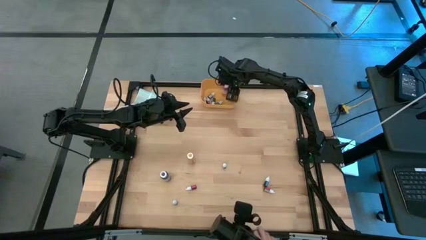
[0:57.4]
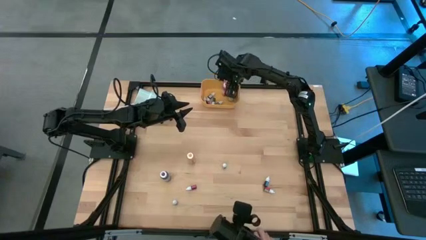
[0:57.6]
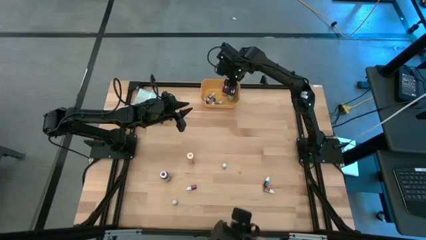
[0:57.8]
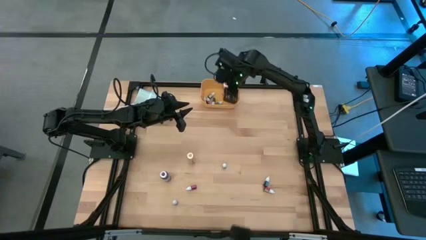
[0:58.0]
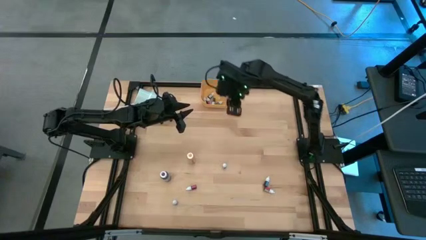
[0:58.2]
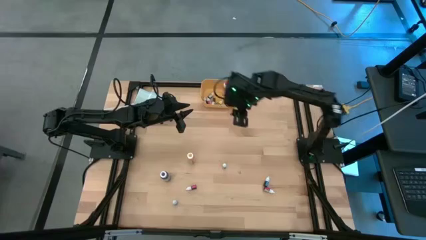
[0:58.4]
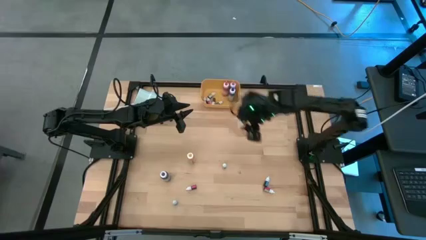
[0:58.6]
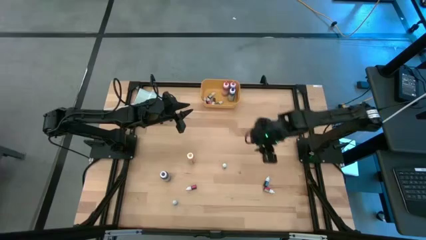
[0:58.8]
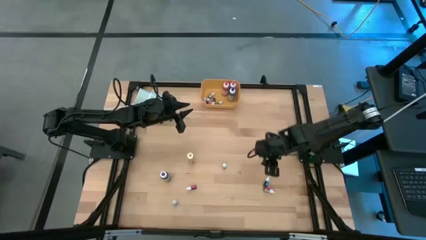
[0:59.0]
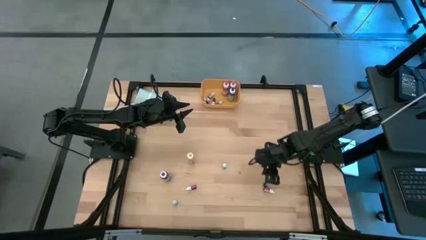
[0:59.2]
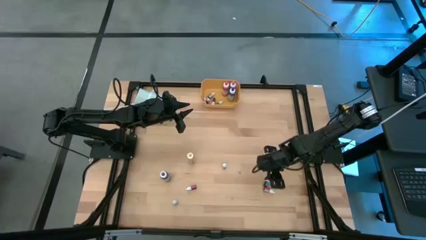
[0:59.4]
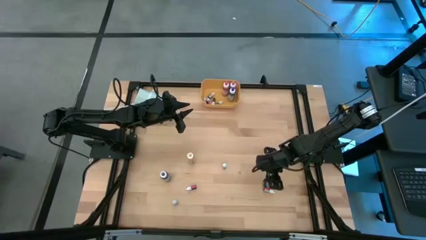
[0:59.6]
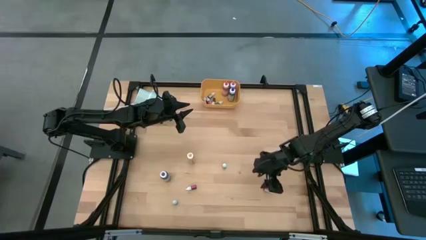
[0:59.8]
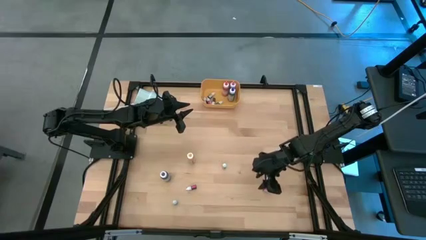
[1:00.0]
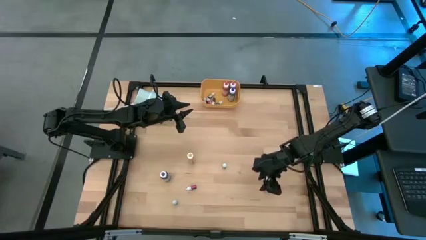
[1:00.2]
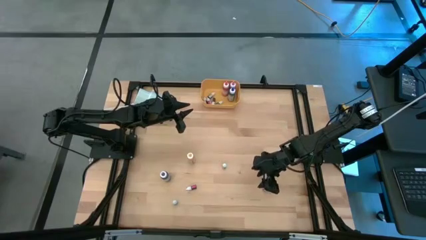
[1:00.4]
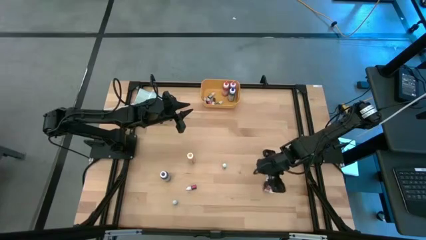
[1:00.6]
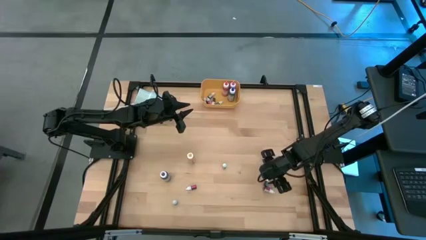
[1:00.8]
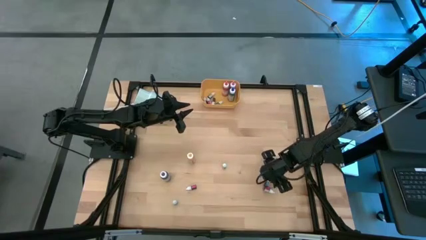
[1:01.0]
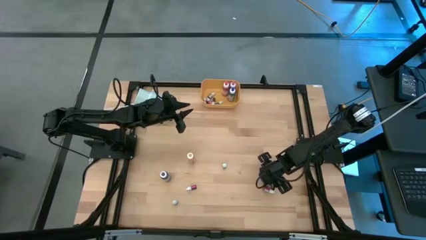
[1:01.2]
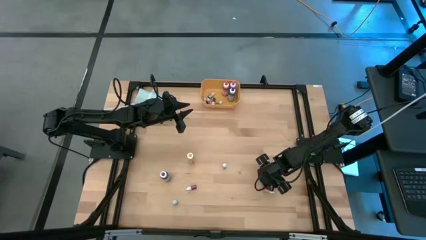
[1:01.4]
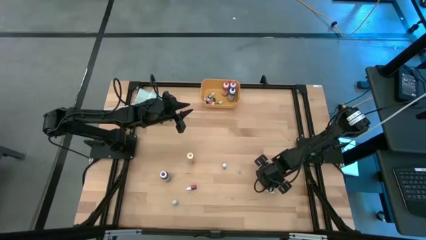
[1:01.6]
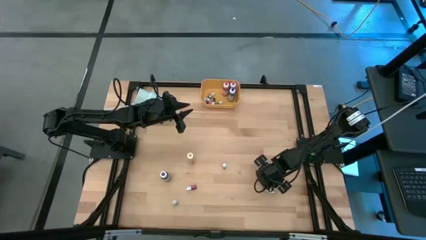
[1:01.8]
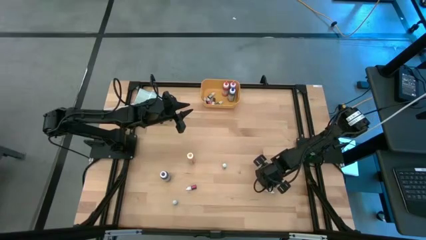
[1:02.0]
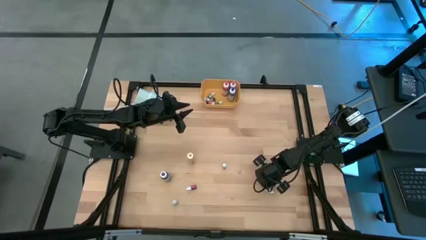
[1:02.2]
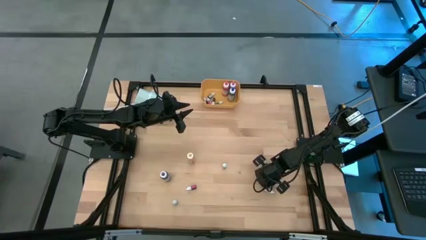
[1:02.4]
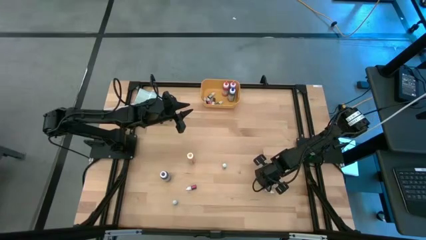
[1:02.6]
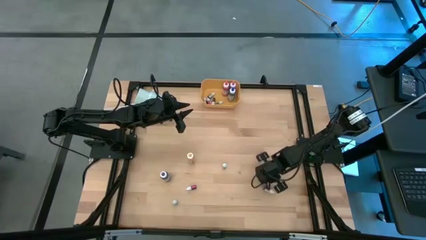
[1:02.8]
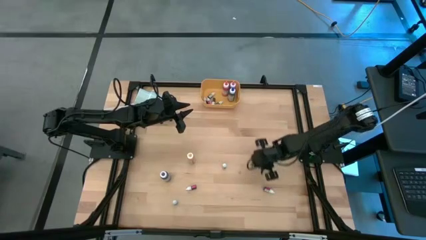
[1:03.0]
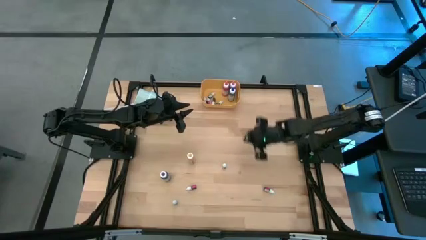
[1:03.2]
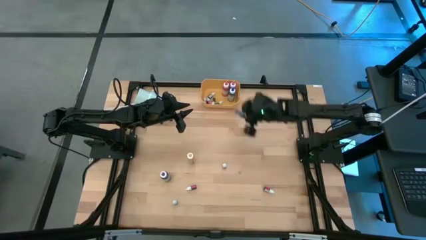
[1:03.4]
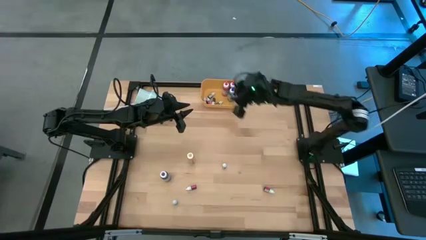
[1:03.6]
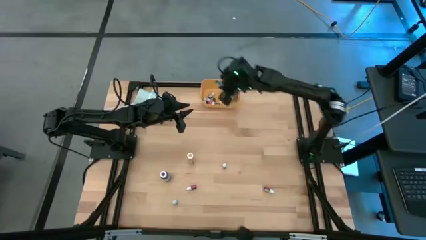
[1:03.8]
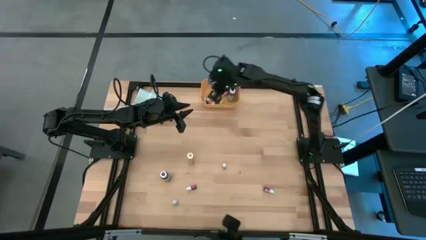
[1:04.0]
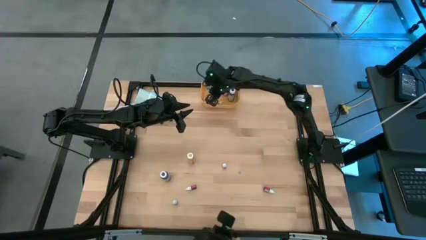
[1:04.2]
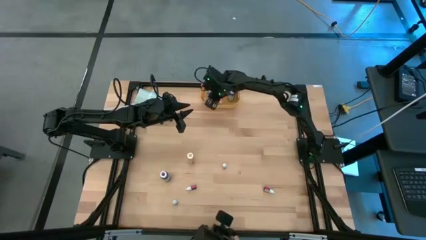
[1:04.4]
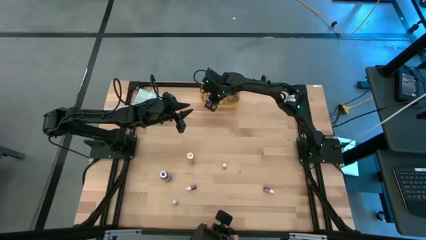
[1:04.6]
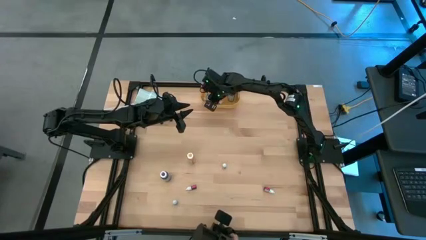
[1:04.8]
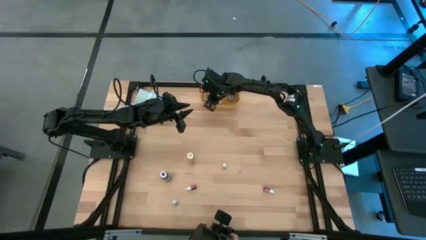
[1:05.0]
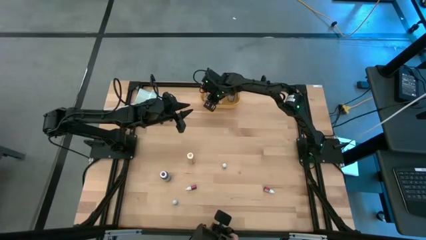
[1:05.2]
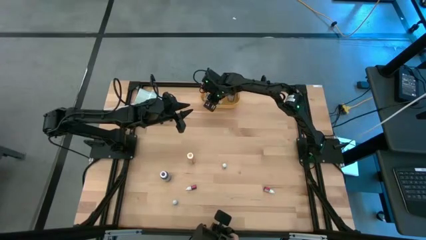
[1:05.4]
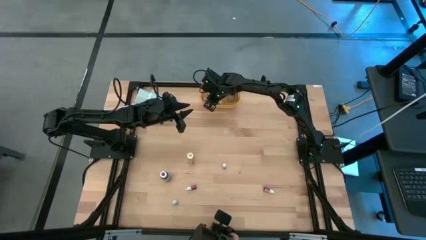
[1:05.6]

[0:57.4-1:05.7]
Task: Pick & Place food coloring
Put the small blue food coloring bottle into the yellow bin

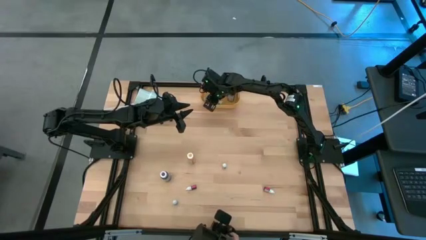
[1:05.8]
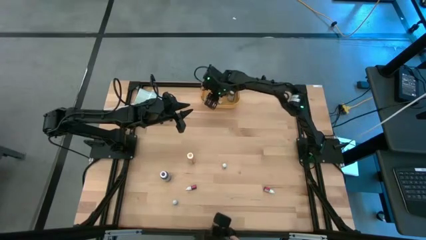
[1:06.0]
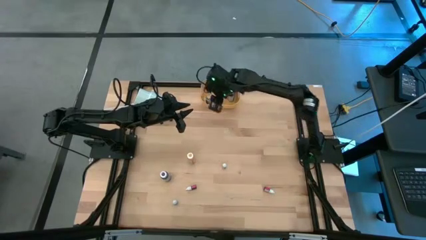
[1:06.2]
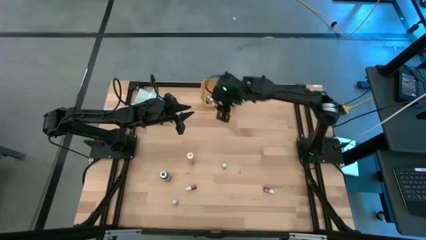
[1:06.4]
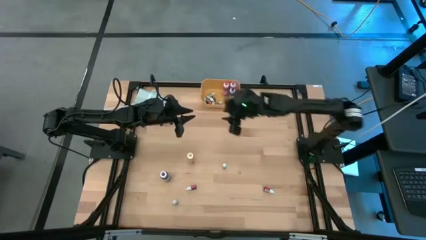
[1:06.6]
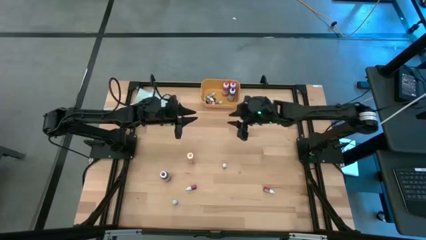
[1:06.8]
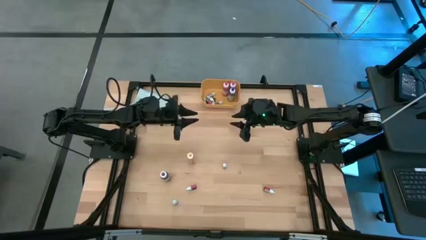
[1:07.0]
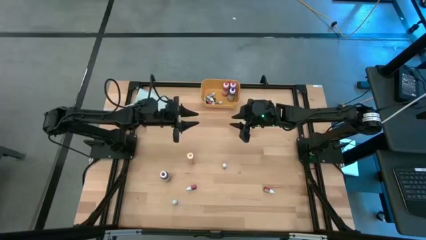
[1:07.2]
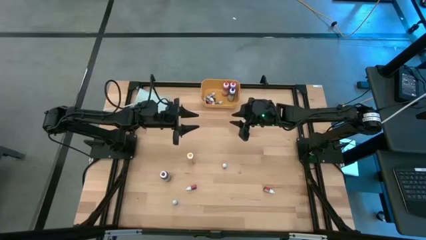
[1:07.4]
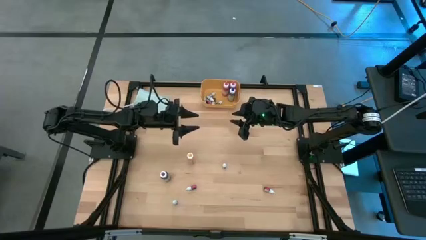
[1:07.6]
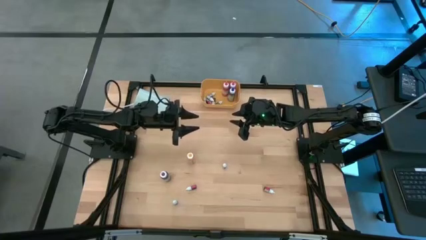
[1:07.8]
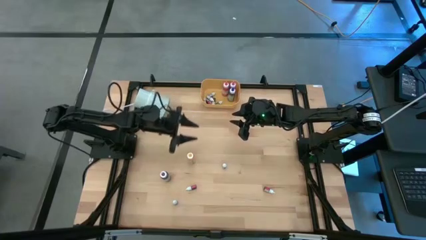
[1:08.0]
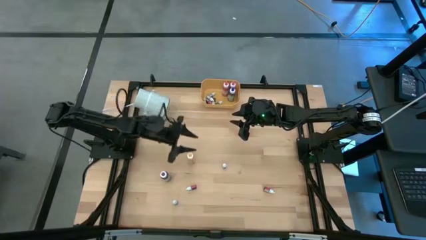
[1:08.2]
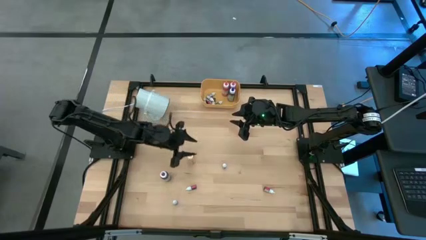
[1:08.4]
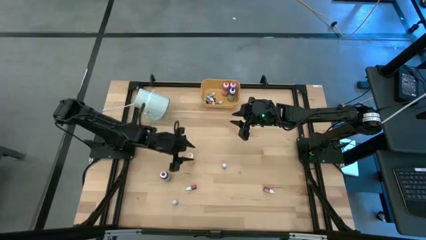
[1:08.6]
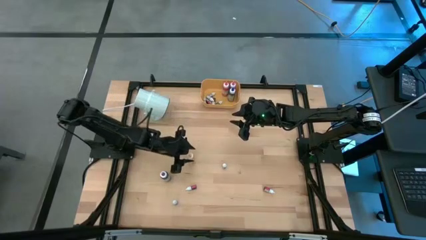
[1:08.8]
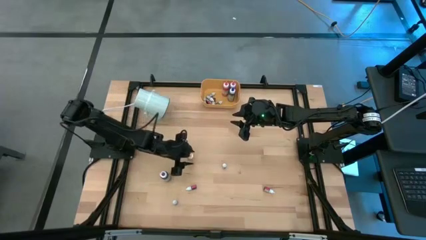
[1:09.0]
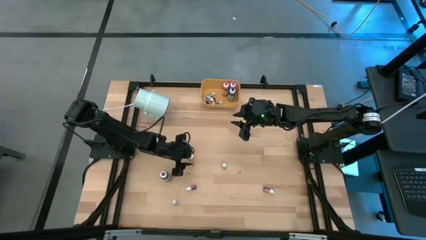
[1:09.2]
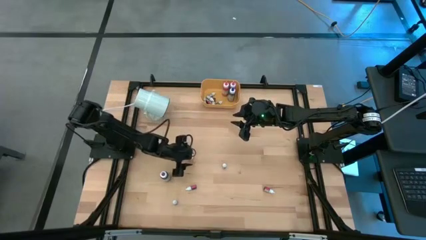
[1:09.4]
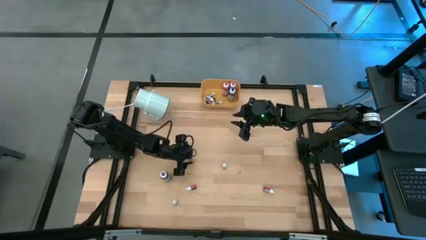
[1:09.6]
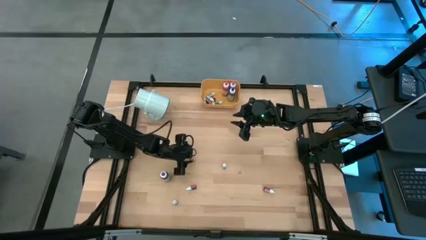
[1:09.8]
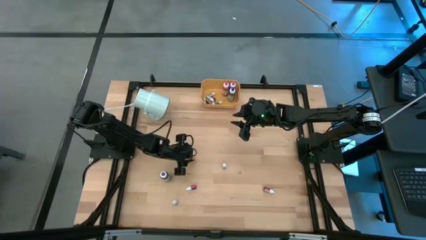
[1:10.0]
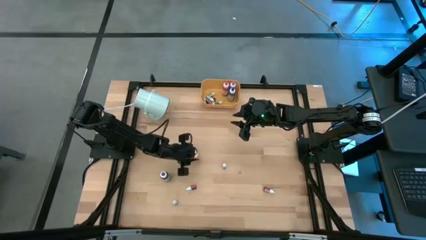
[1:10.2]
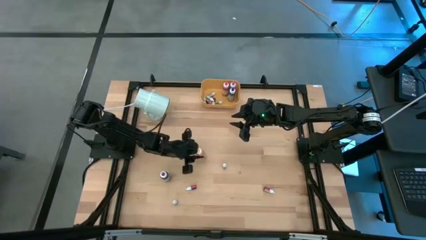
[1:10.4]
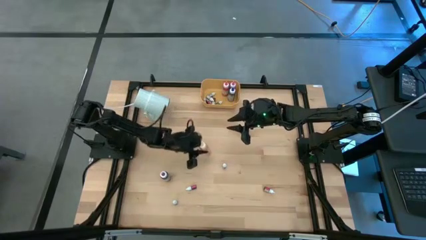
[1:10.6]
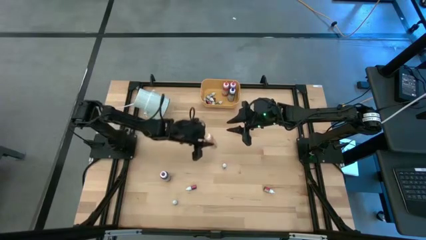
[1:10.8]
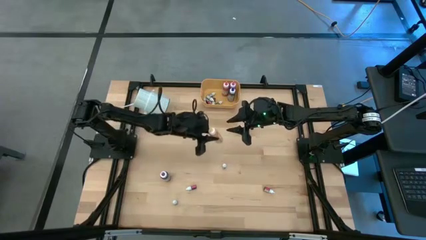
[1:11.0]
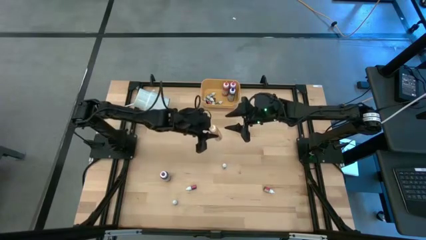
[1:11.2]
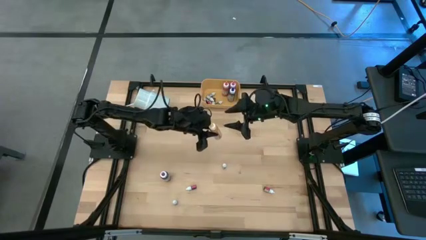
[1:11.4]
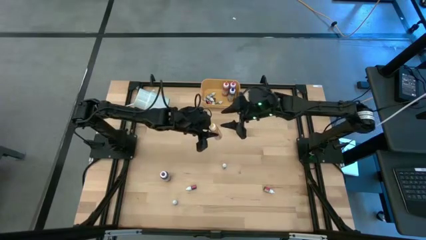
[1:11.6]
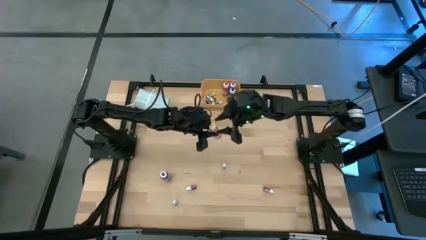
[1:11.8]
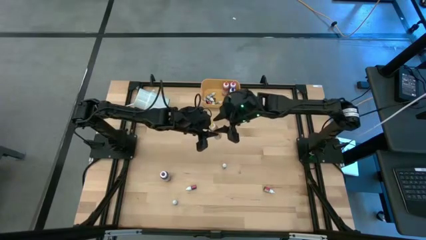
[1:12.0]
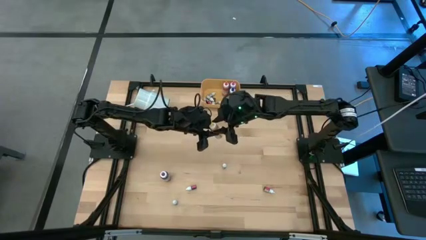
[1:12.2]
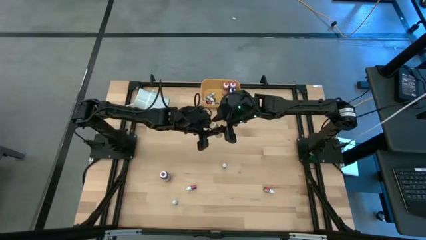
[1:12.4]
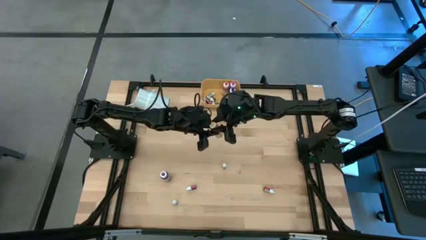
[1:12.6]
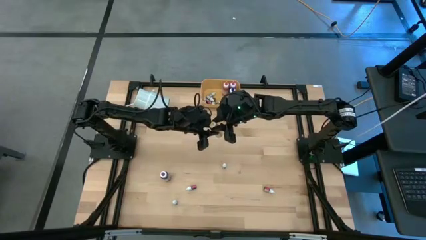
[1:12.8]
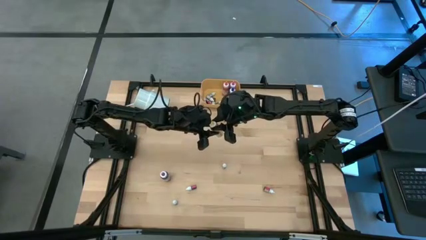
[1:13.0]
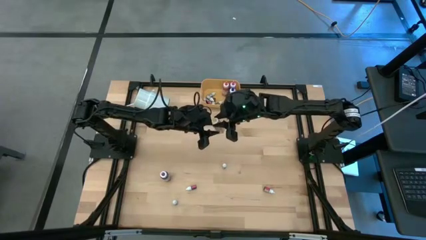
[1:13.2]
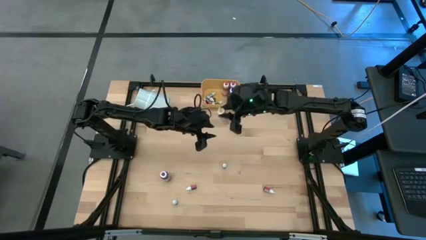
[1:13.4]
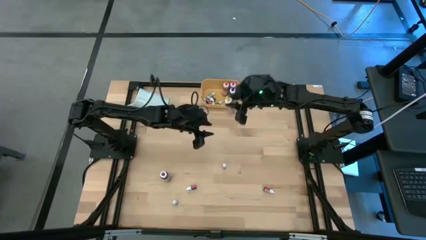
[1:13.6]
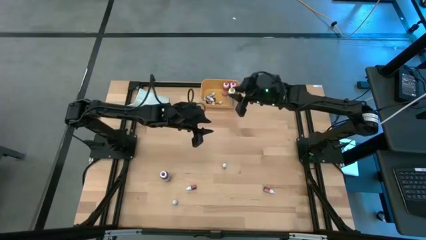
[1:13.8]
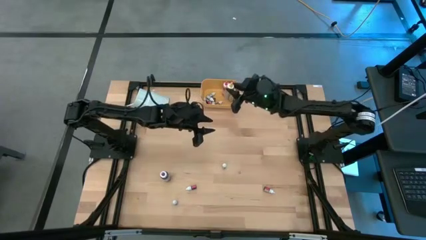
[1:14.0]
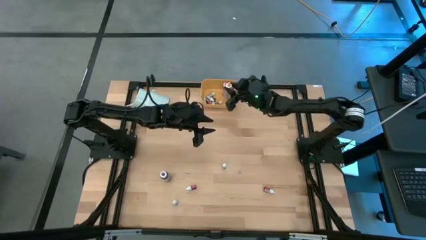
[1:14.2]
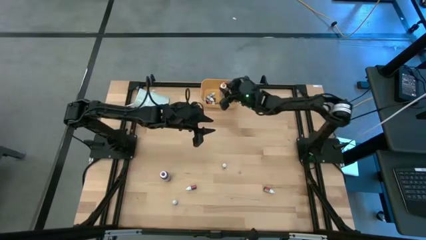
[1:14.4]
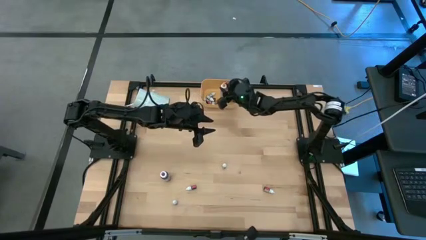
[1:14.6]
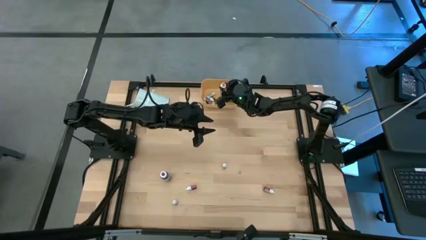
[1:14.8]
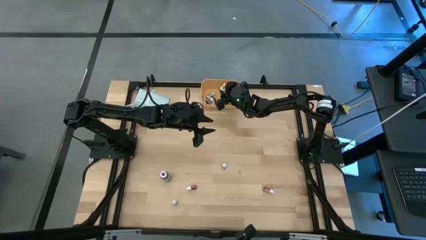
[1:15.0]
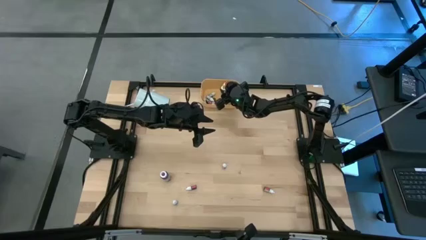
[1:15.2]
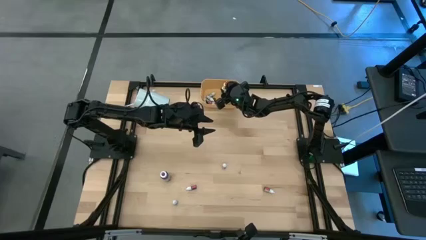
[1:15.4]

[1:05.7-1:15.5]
Put the yellow food coloring bottle into the yellow bin
